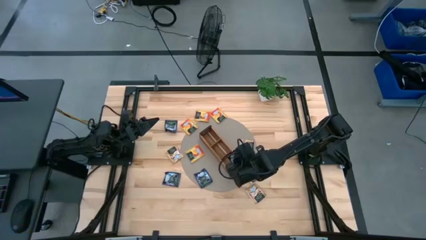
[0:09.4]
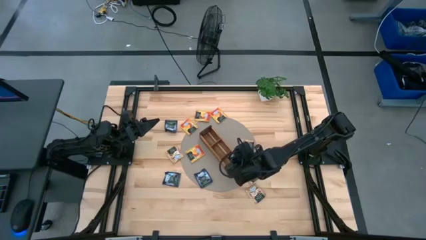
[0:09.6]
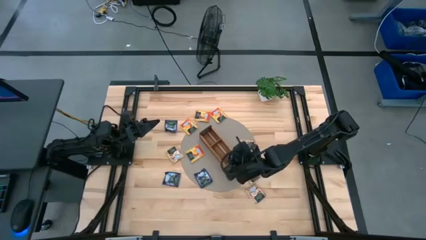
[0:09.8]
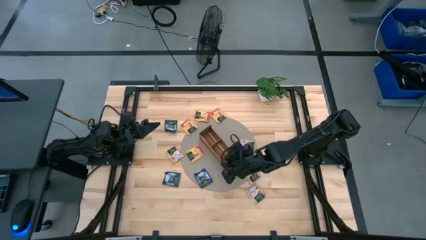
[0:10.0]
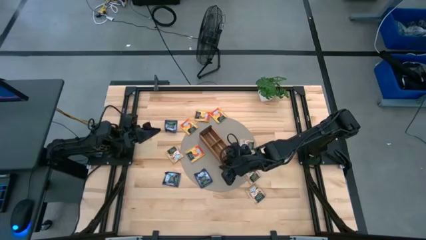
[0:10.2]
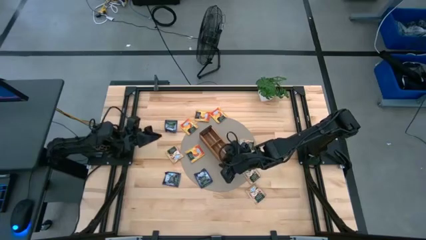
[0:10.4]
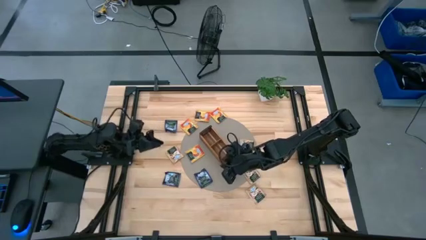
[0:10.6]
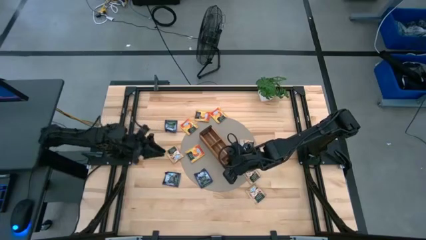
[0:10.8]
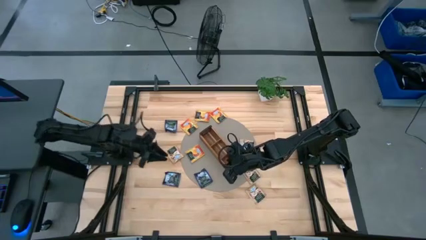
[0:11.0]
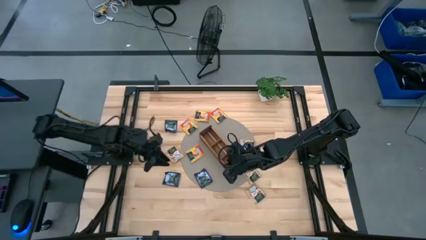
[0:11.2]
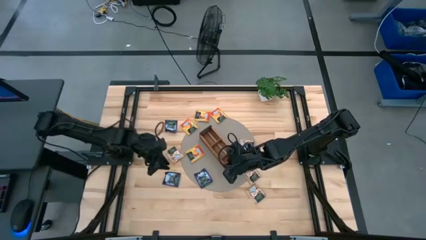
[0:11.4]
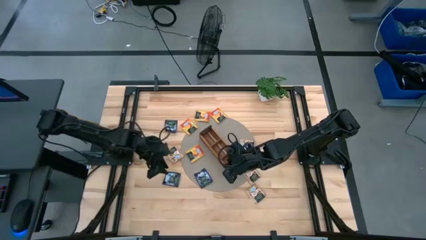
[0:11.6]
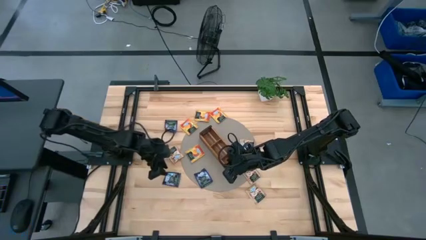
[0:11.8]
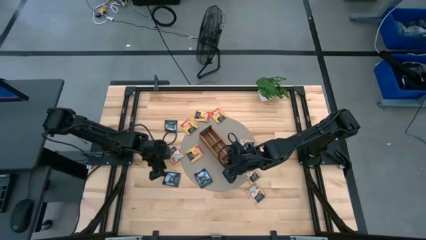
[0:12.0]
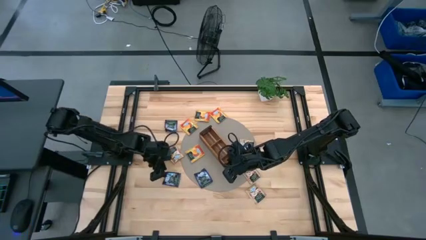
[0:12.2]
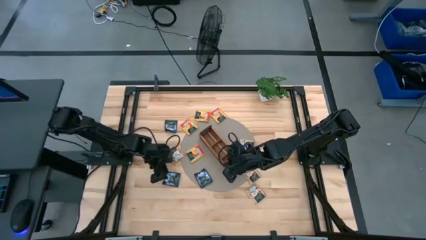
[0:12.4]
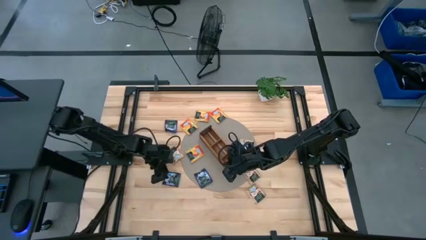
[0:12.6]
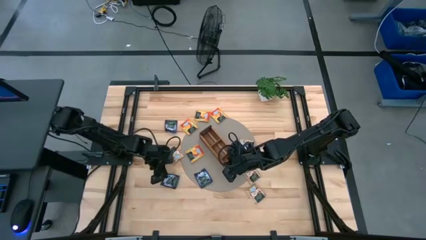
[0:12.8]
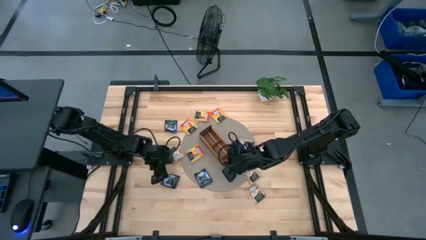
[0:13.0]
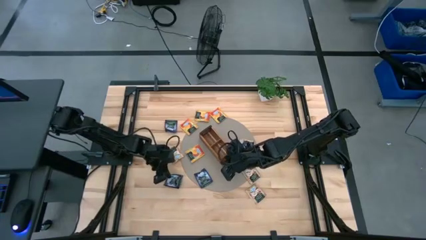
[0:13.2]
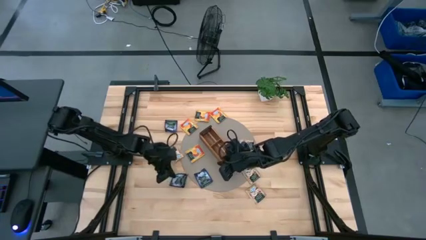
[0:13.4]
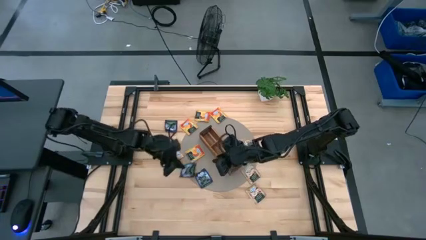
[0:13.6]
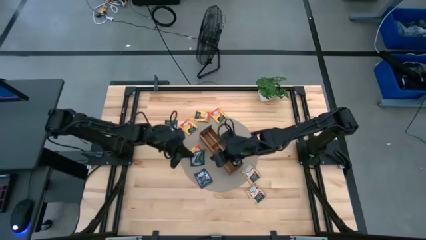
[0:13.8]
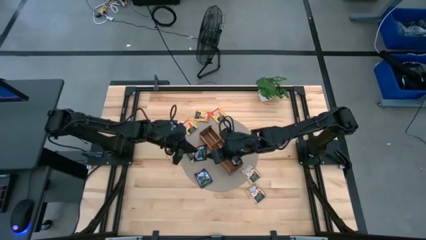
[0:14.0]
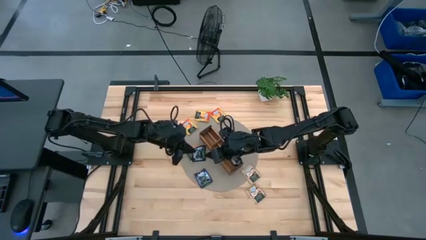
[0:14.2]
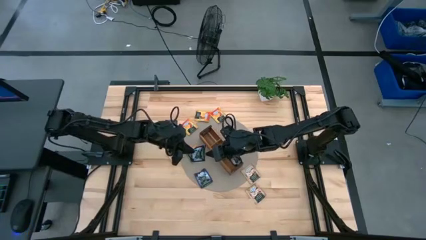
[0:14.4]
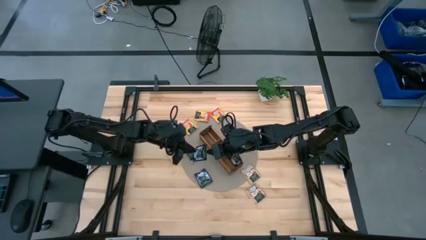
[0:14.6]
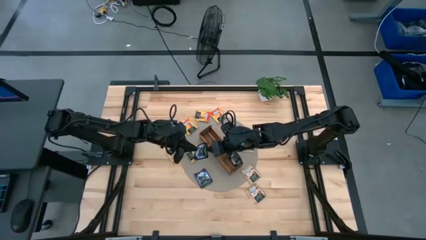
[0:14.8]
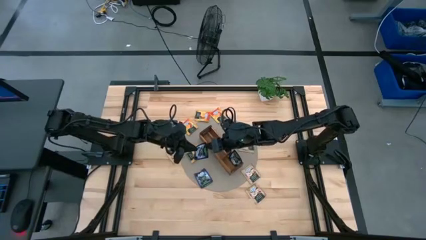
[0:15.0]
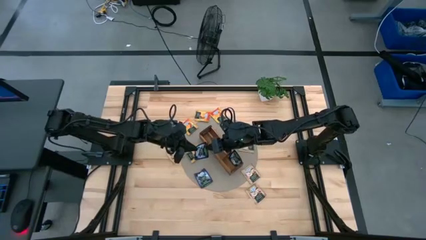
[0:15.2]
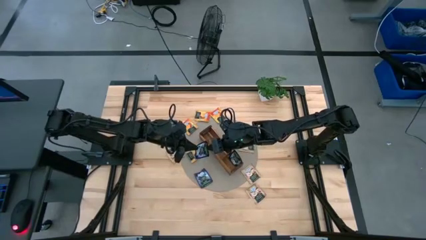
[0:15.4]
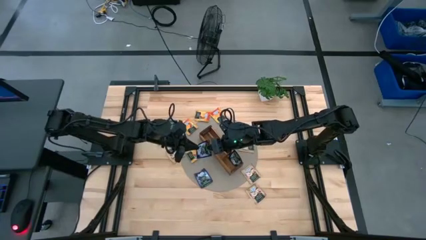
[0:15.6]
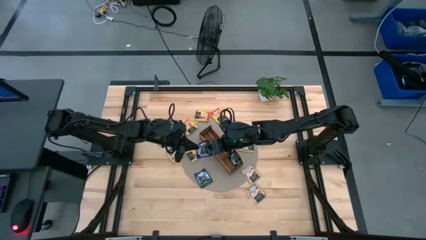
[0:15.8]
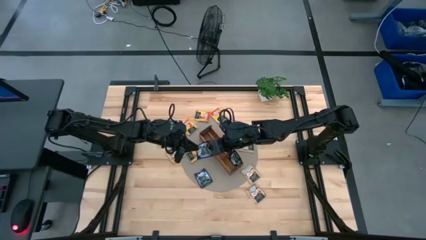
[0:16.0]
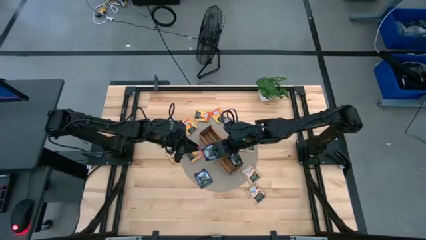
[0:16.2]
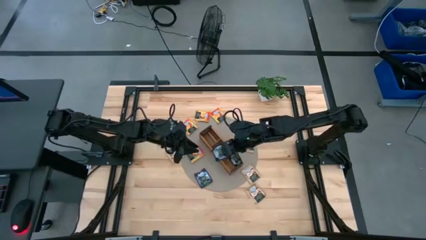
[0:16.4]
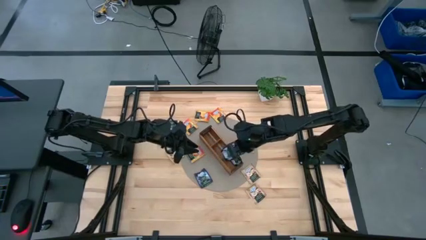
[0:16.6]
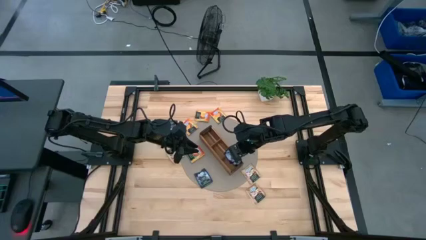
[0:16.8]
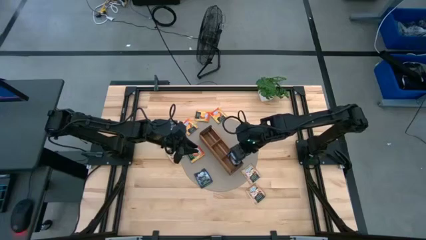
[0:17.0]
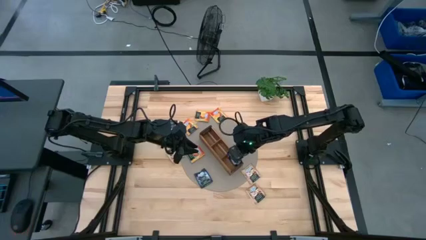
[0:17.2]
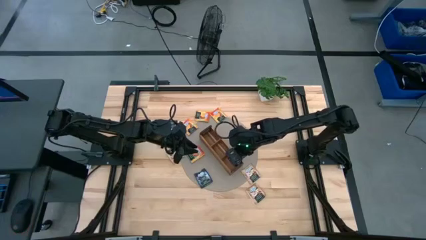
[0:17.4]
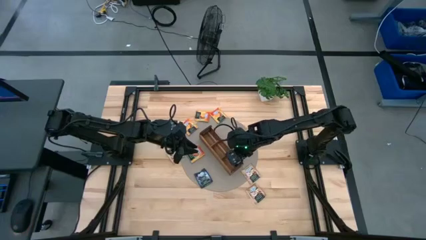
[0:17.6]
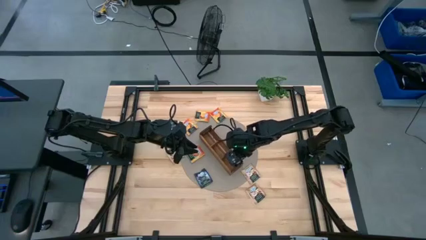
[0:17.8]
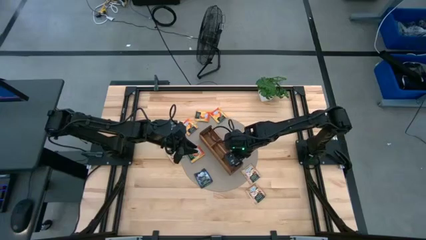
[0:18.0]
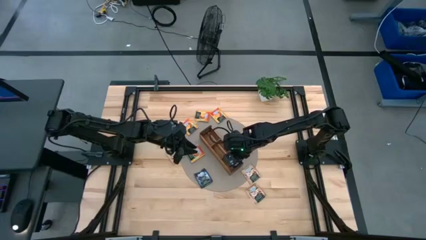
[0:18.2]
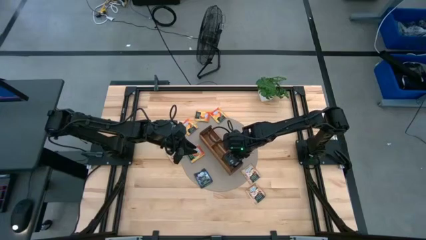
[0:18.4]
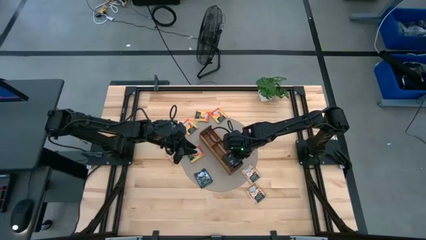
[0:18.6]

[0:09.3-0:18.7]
Task: Pick & Place Tea
Put the purple tea bag into the right section of the wooden organizer

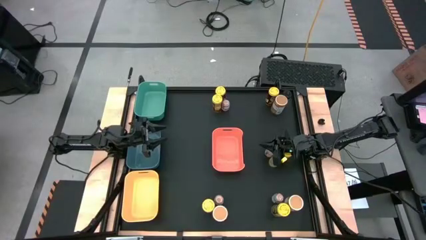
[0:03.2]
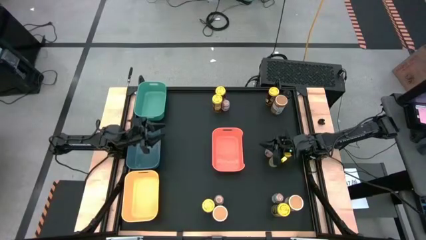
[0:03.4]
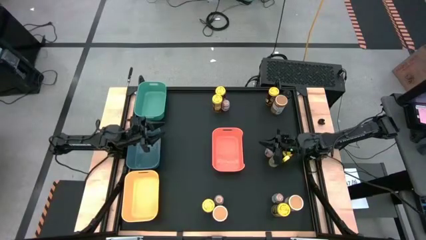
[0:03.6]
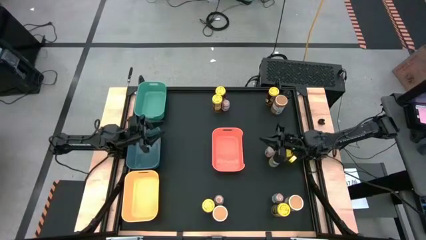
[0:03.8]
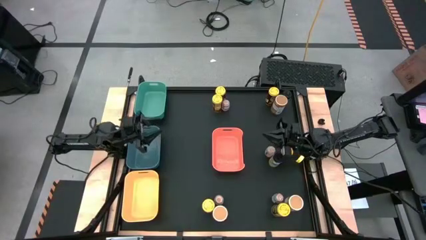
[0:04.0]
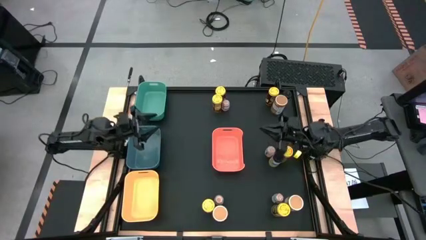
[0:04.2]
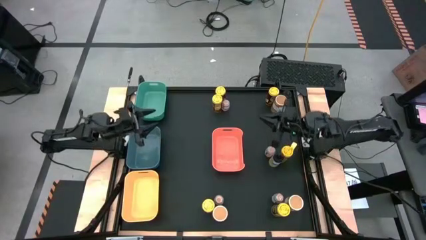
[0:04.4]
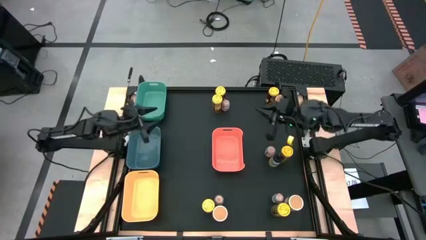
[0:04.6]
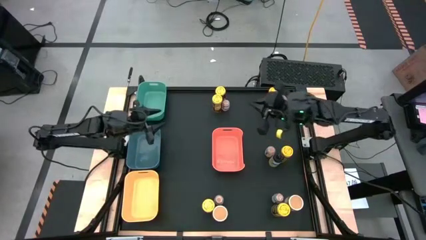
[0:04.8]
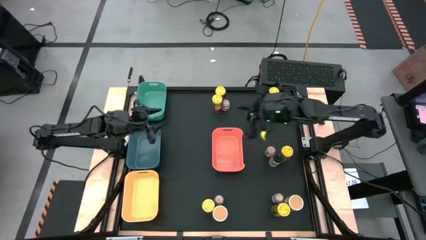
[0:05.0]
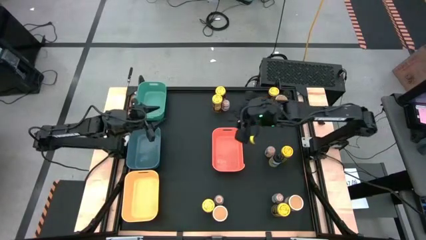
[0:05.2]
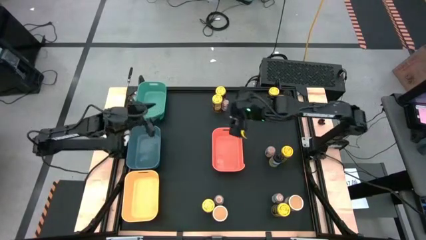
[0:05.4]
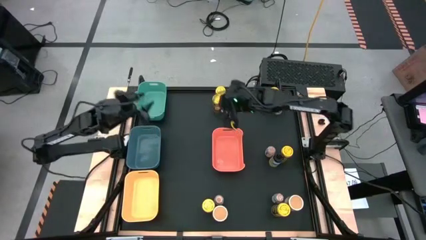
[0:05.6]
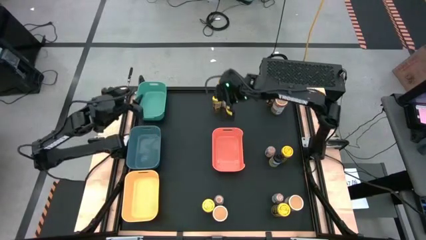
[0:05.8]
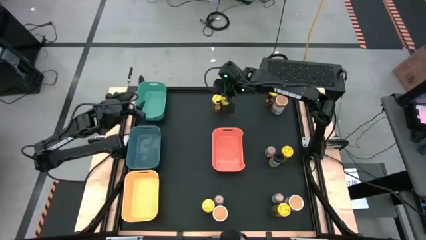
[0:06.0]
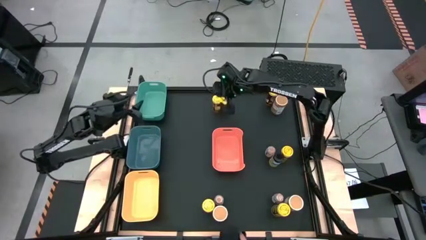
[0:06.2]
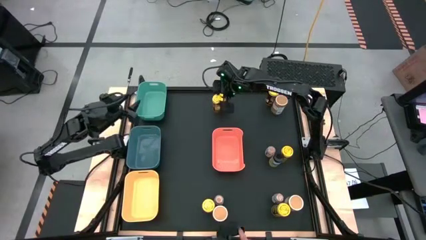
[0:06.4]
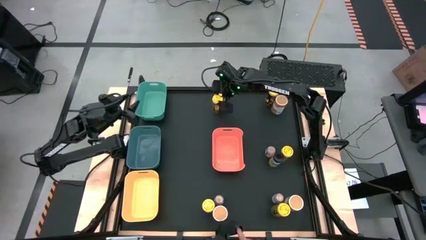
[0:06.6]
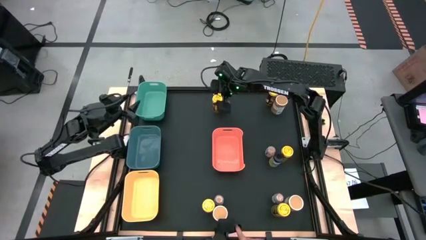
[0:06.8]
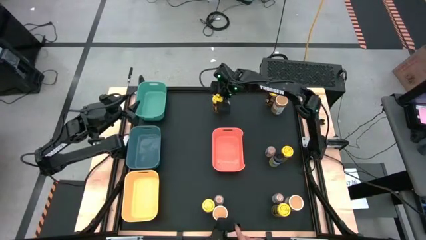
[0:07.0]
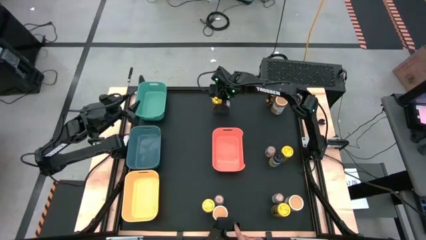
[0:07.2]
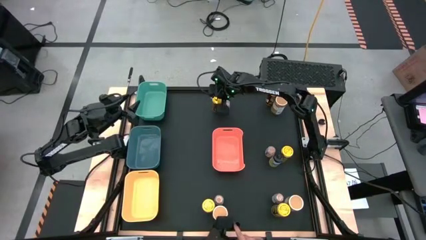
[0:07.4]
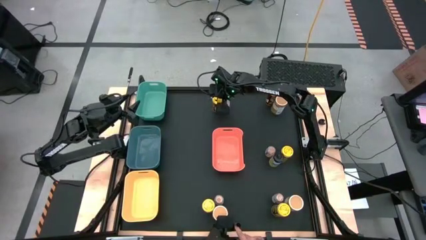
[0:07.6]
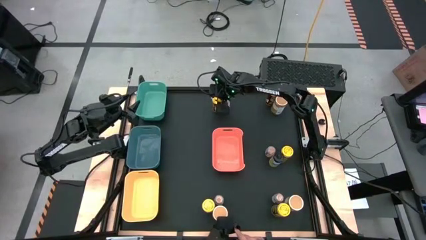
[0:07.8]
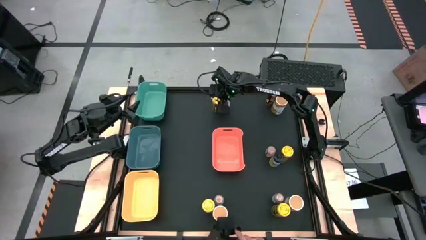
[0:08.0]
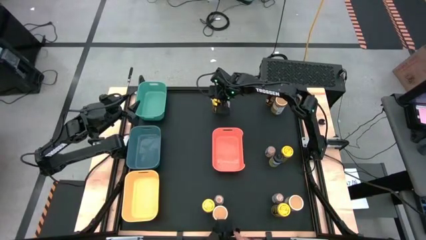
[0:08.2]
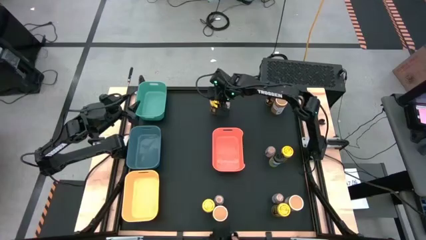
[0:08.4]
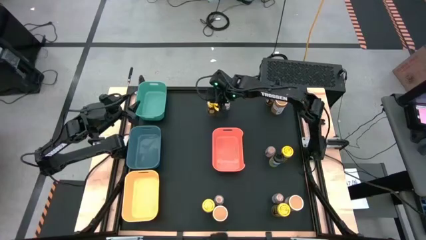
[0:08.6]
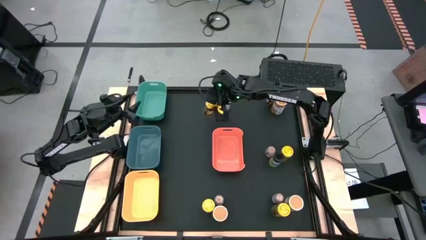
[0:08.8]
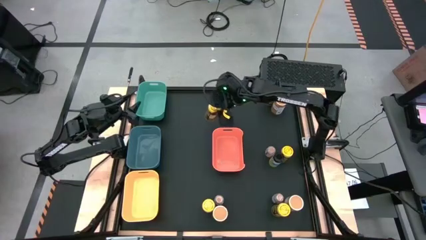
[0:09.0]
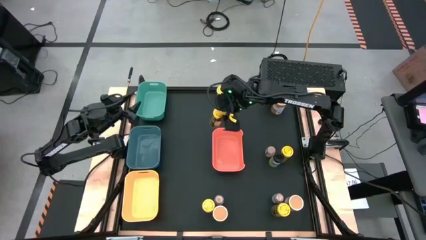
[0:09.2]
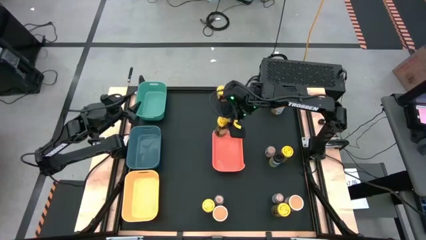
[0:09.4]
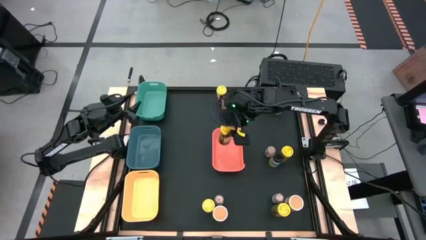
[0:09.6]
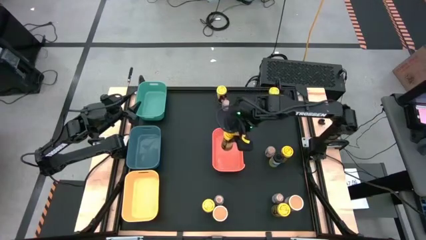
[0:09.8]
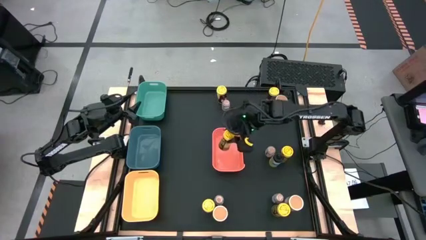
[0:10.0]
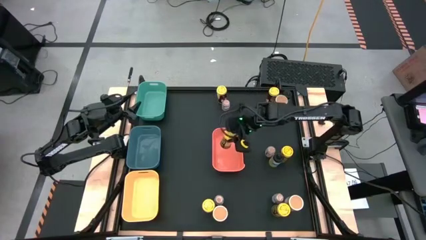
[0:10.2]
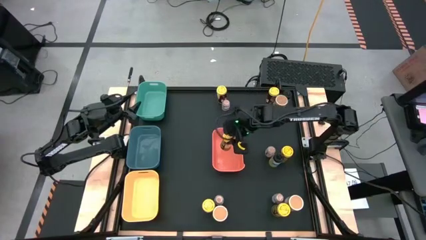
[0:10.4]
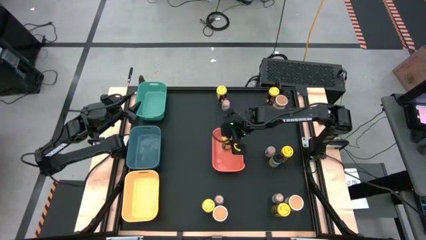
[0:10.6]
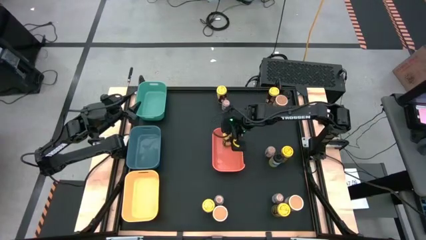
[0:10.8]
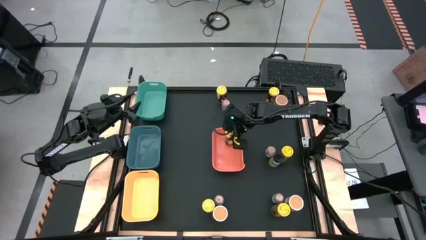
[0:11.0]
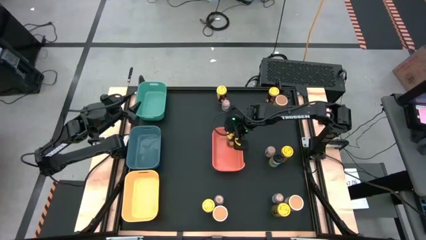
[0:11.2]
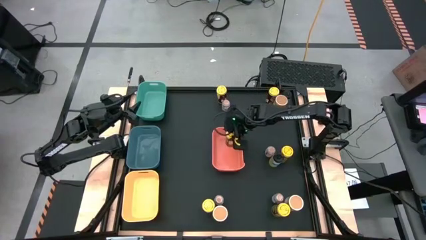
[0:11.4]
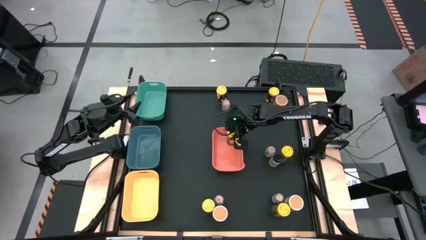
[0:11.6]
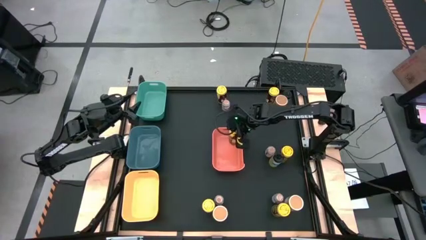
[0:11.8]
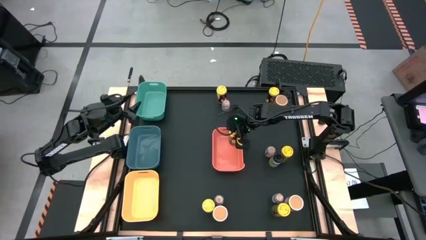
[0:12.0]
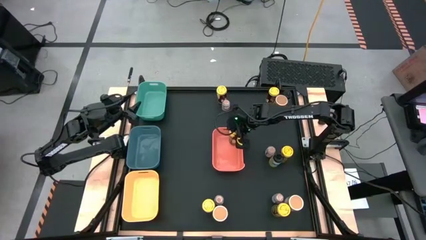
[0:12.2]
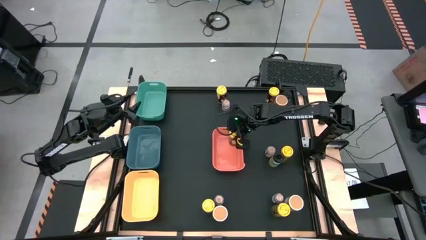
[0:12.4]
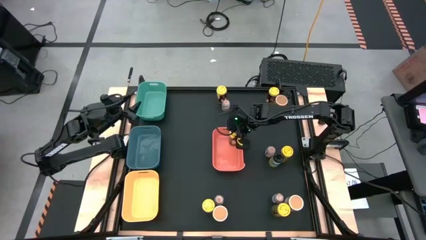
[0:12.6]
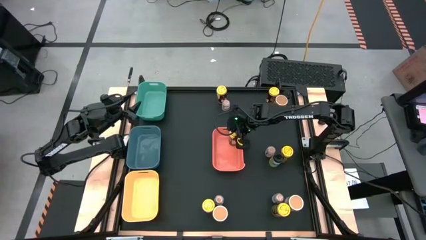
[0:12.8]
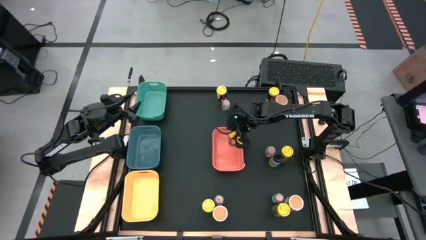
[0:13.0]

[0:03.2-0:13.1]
Task: Sort spices by type
Put the yellow seasoning can in the orange bin
